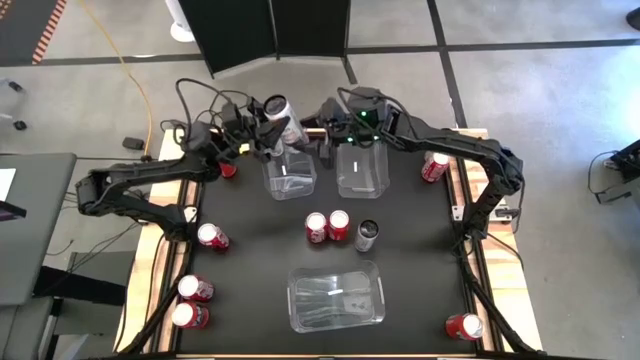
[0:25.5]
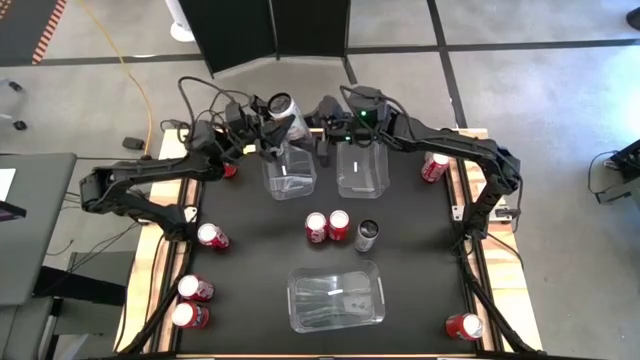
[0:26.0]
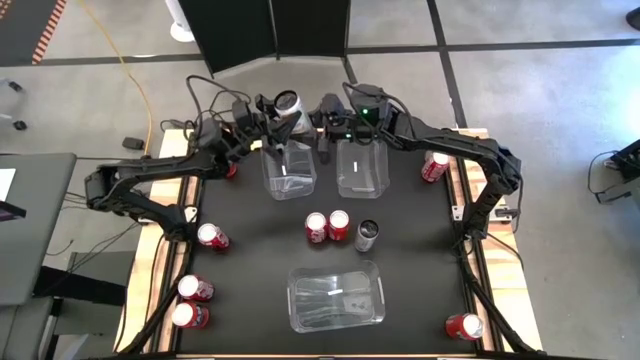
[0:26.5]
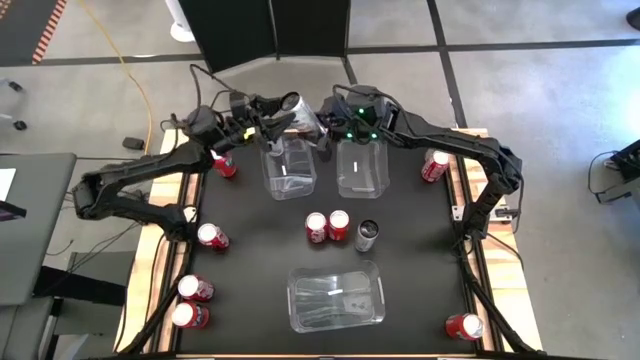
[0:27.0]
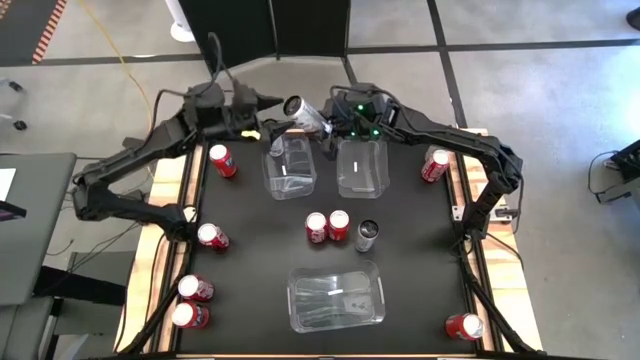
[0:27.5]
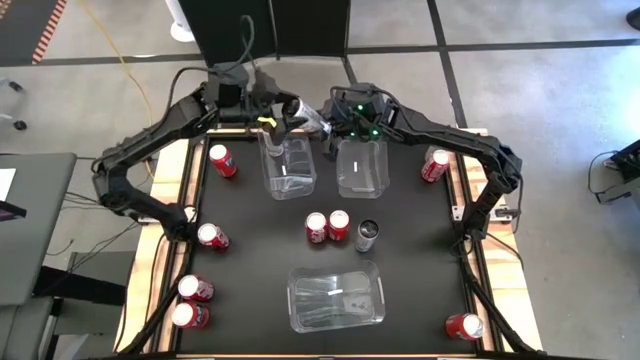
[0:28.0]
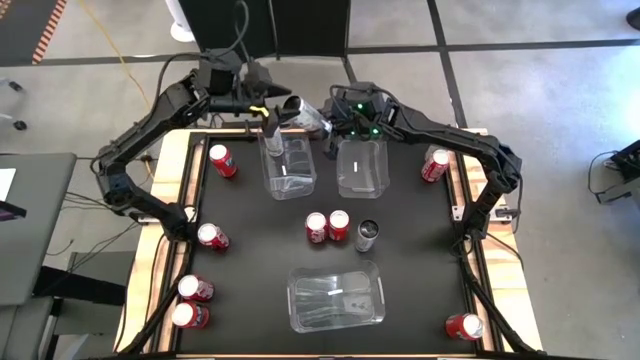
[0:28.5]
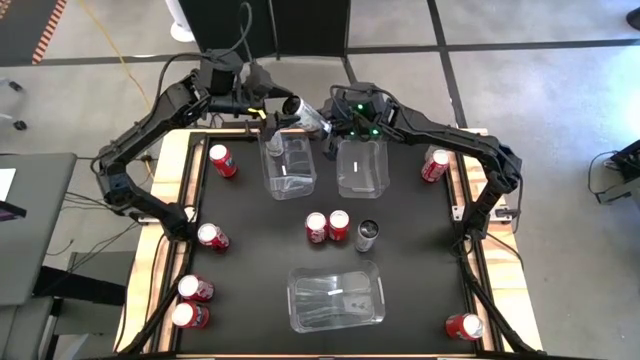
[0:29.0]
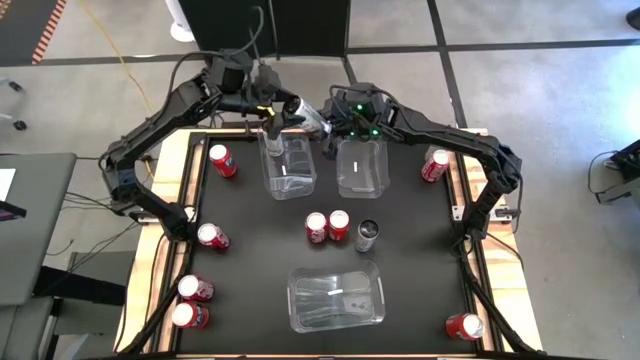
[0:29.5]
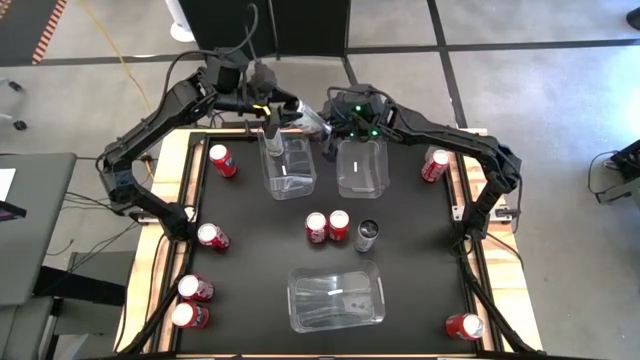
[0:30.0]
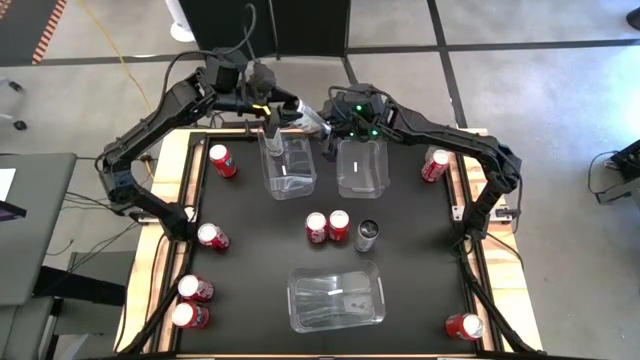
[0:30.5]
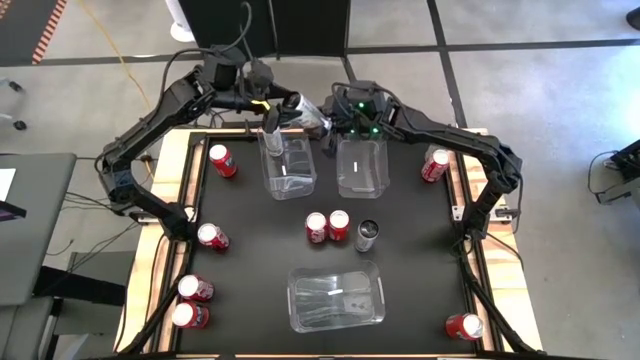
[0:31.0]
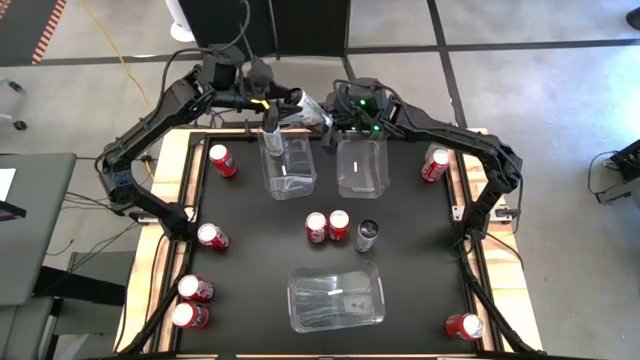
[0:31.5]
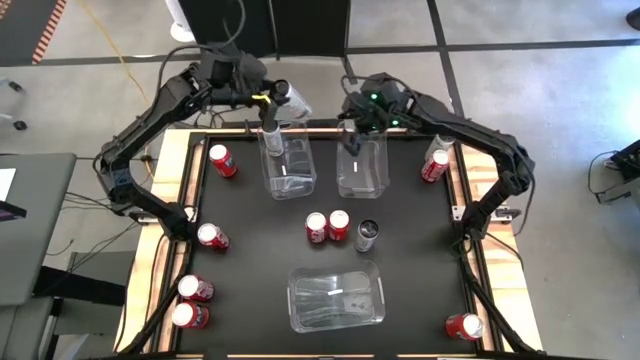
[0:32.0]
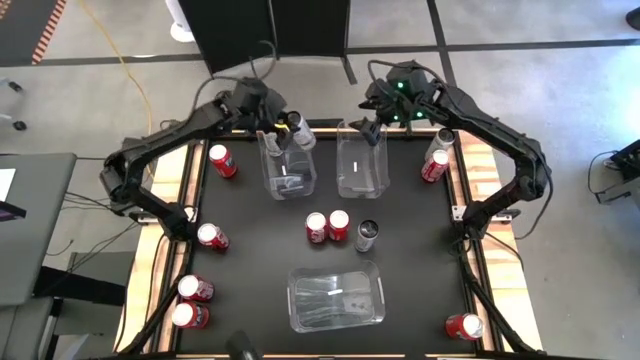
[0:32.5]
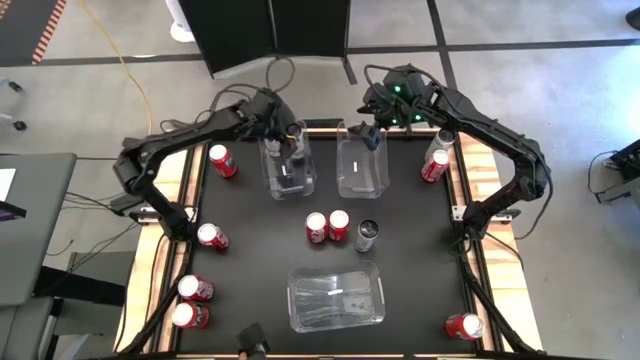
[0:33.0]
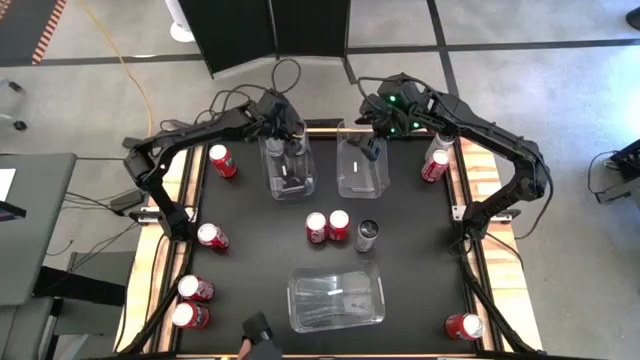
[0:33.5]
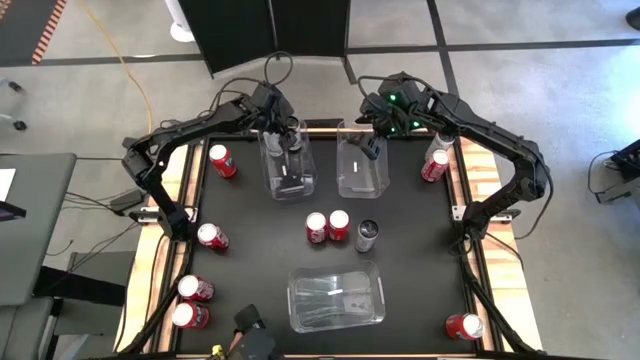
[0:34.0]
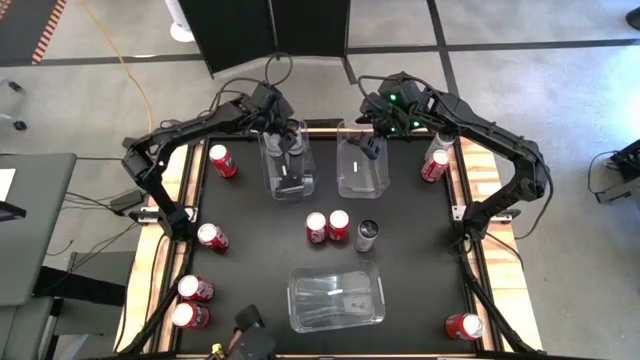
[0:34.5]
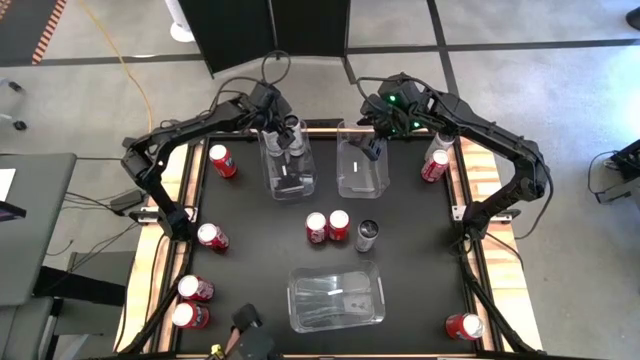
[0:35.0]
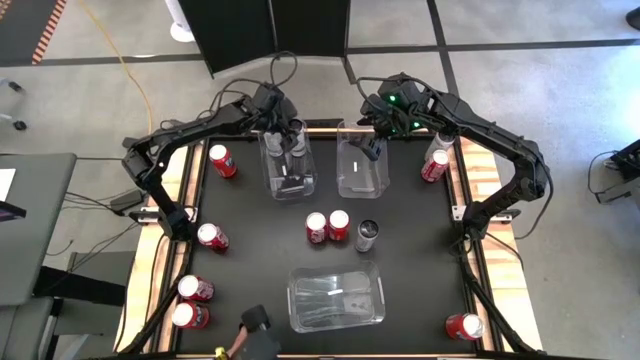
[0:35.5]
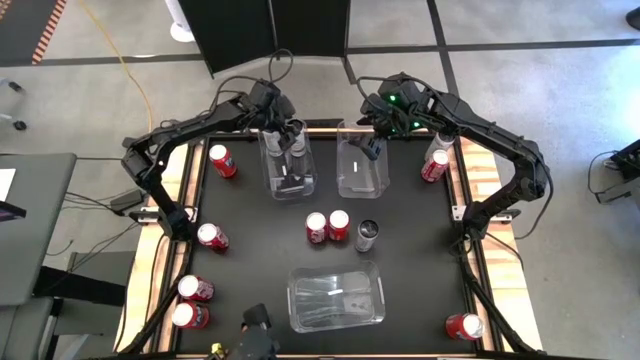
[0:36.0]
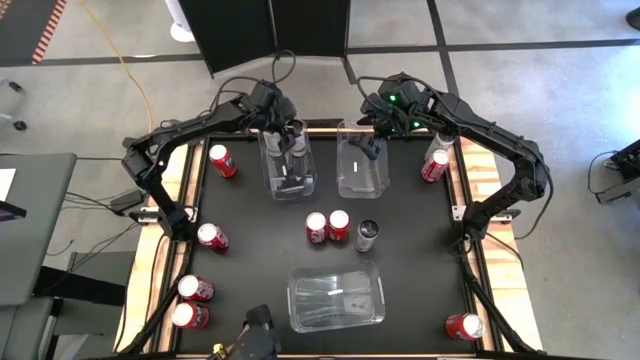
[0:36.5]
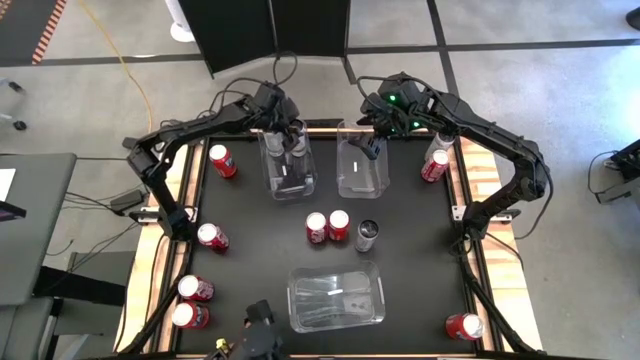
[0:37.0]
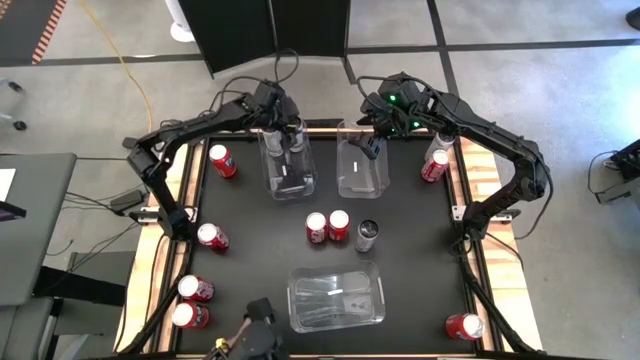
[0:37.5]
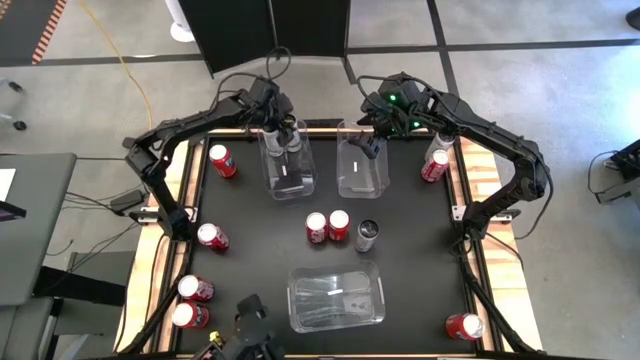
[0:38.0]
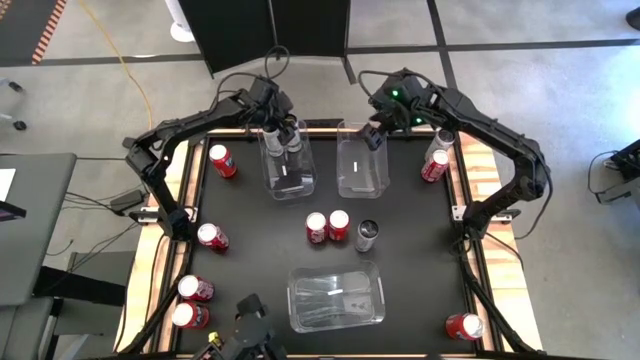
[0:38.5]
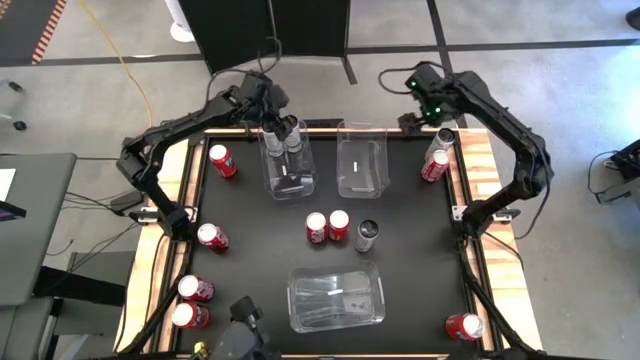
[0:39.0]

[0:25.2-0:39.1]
Task: Sort soda cans
Put the bottom white soda can into the top left transparent bin

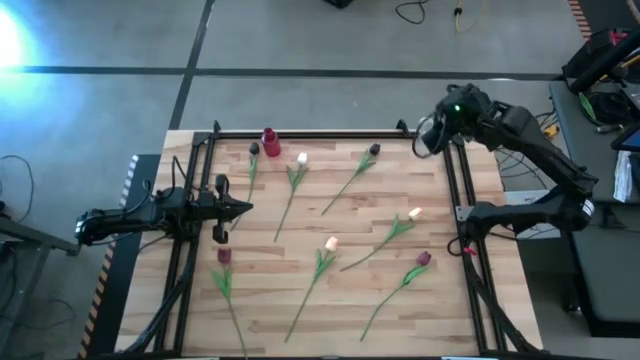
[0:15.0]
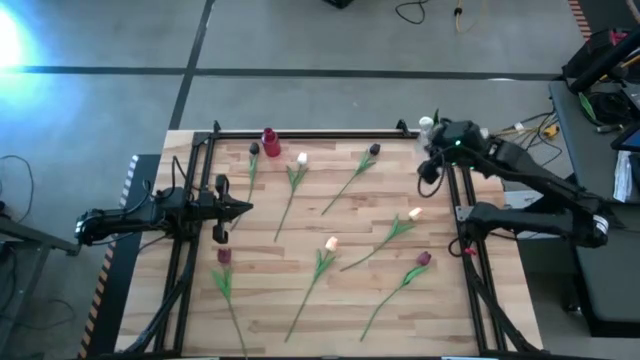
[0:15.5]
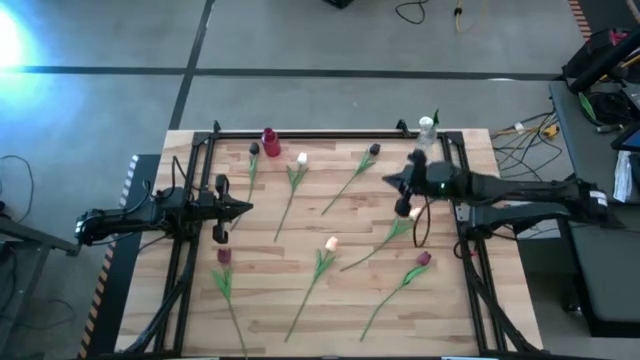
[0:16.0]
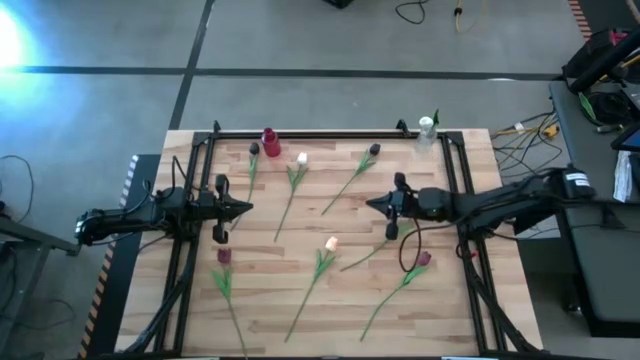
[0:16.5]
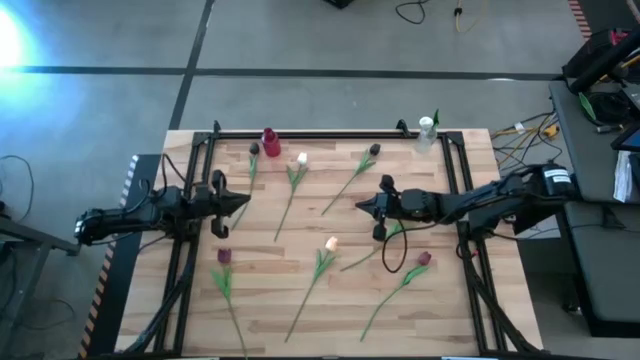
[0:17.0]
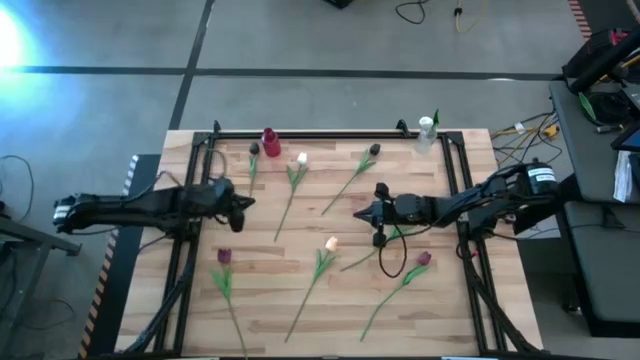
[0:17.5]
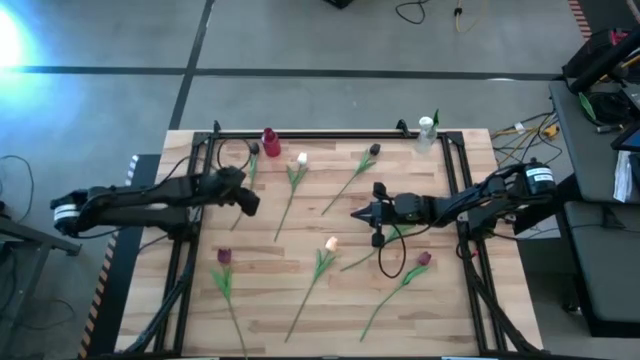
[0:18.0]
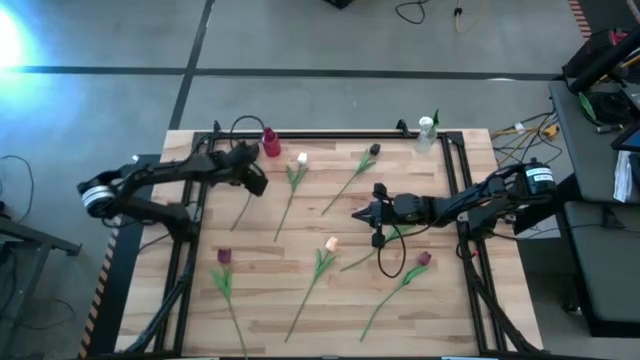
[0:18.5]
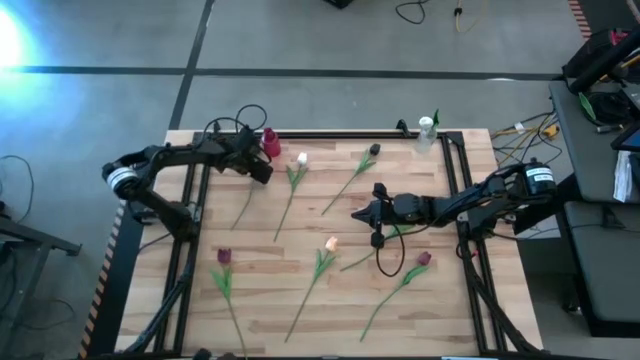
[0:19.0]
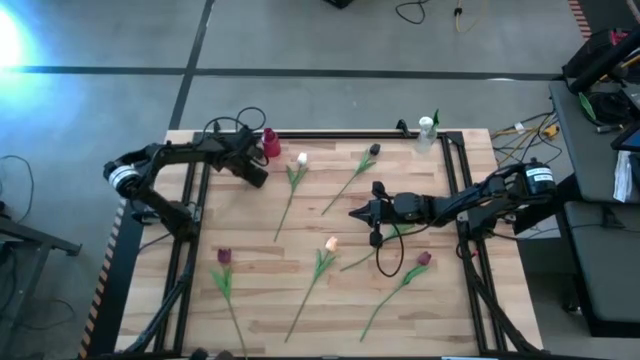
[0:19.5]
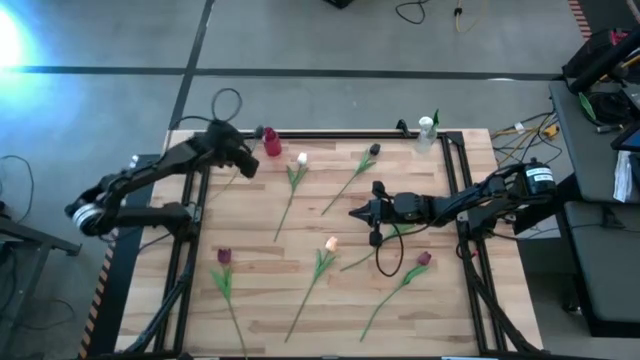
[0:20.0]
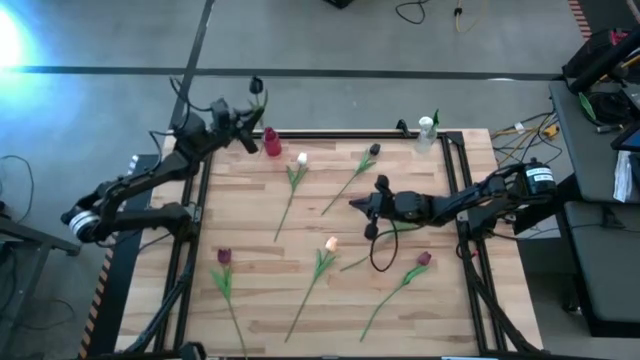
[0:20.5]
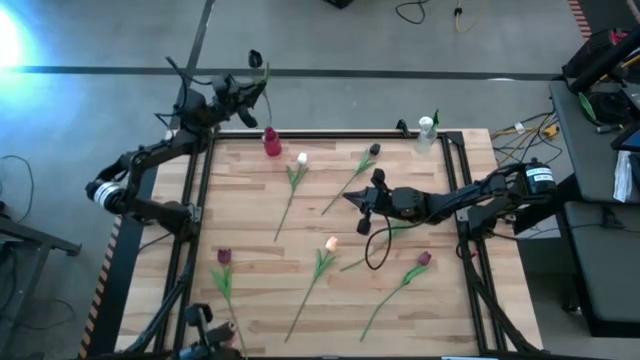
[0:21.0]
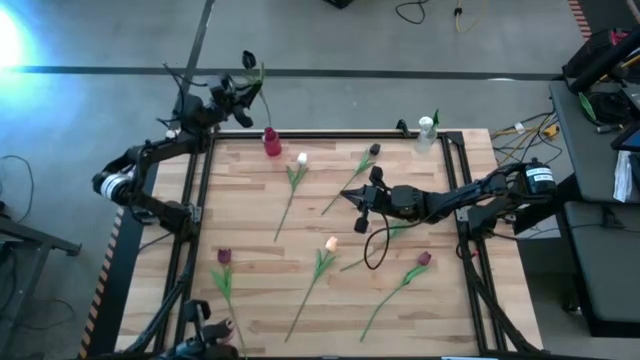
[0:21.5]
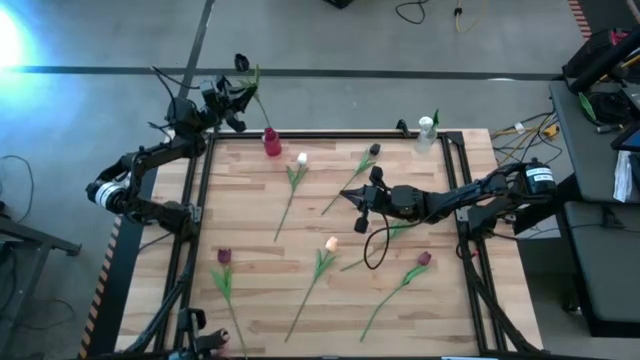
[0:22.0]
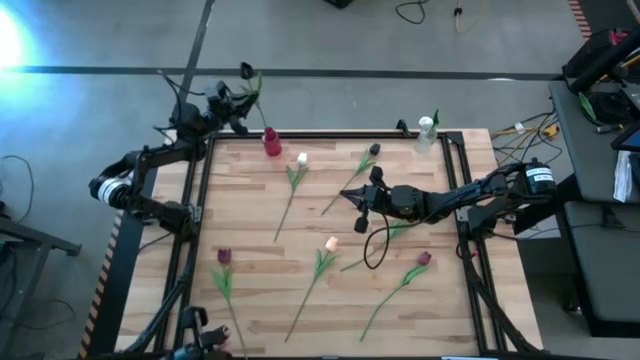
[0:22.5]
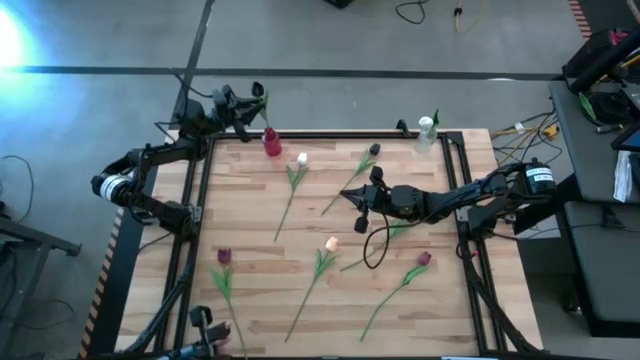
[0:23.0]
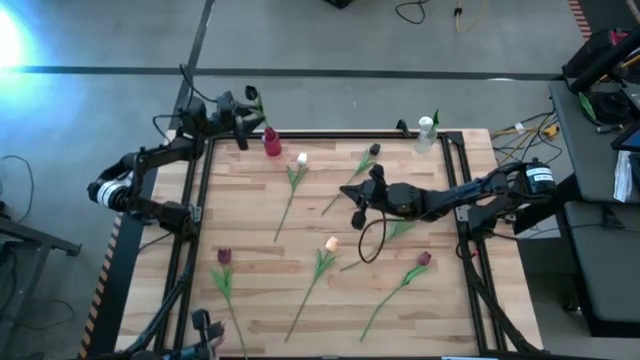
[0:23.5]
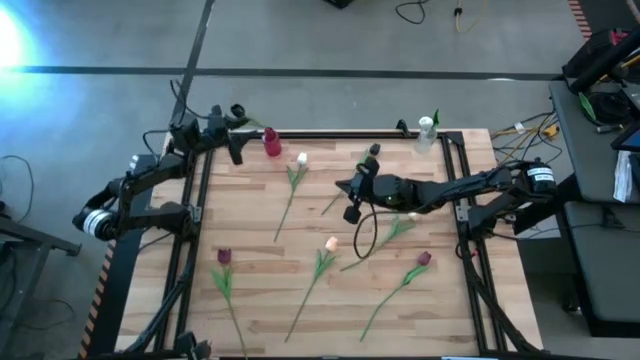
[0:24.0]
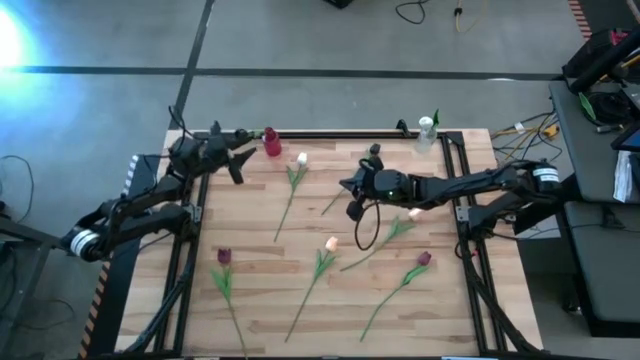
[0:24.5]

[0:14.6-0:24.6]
Task: Sort flowers into vase by color
Put the left black tulip into the red vase
